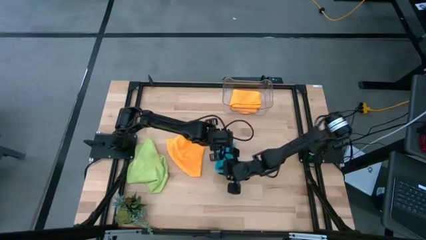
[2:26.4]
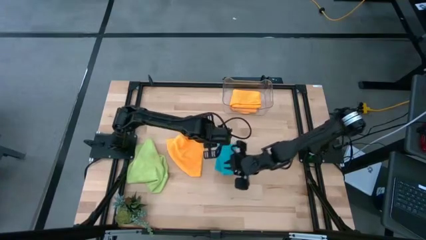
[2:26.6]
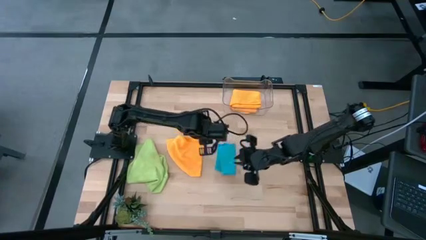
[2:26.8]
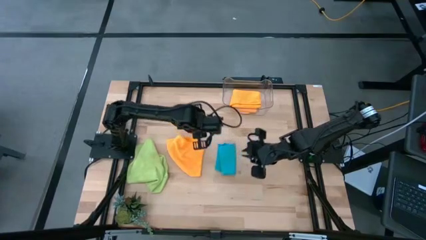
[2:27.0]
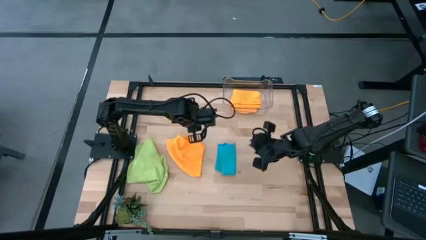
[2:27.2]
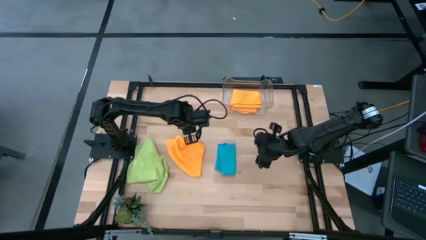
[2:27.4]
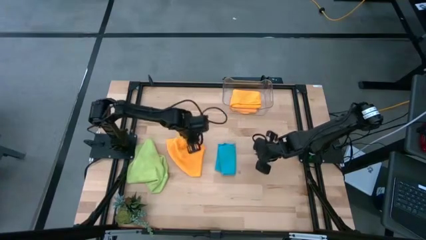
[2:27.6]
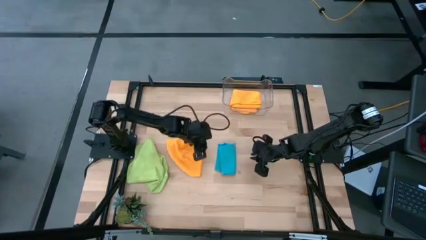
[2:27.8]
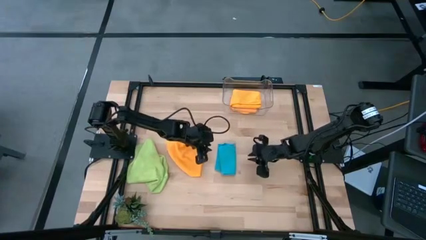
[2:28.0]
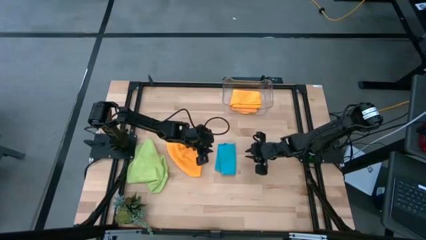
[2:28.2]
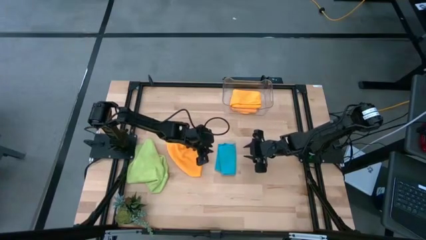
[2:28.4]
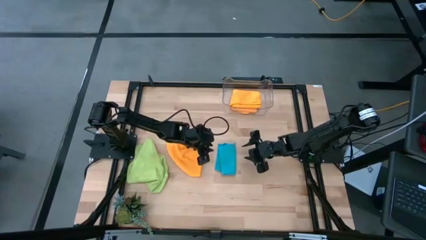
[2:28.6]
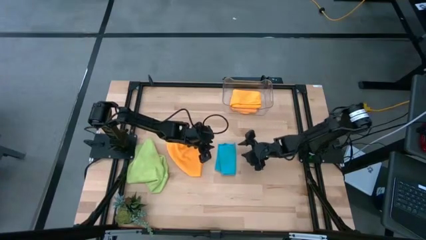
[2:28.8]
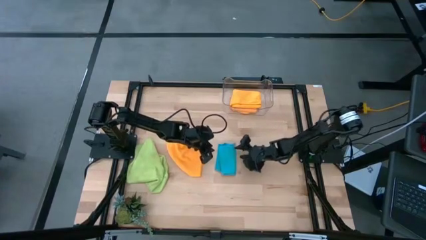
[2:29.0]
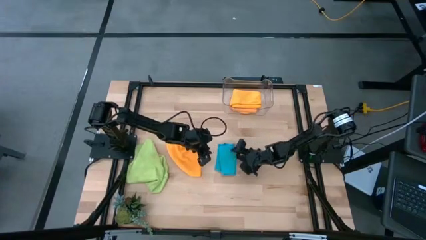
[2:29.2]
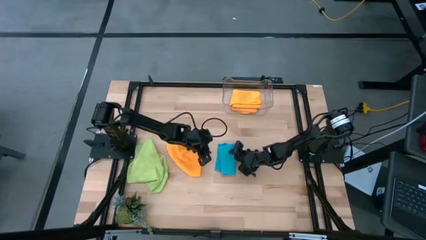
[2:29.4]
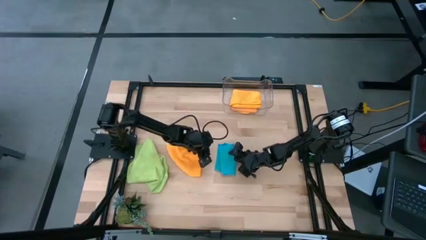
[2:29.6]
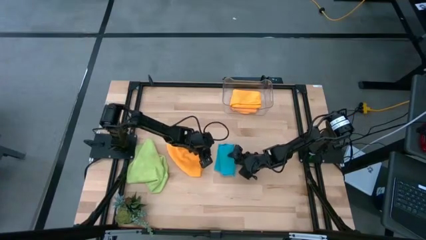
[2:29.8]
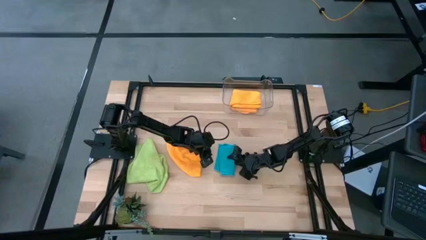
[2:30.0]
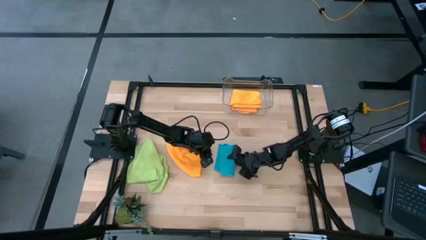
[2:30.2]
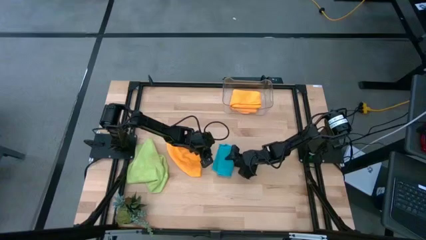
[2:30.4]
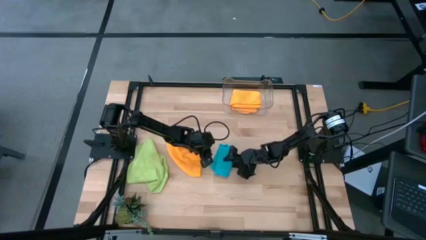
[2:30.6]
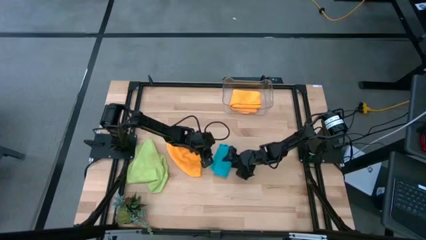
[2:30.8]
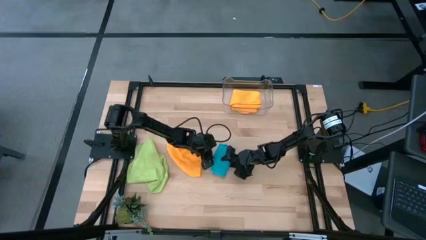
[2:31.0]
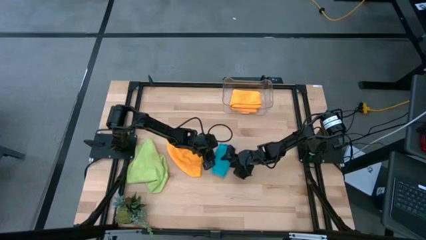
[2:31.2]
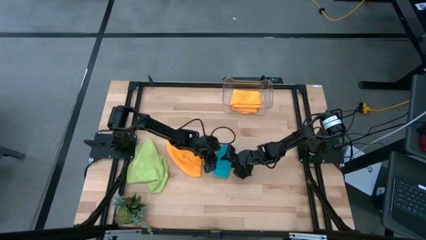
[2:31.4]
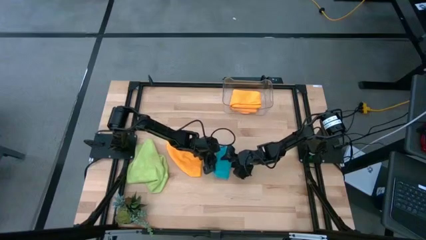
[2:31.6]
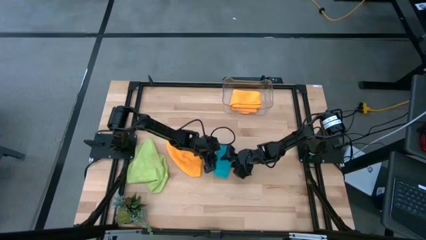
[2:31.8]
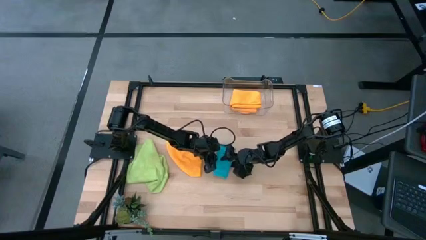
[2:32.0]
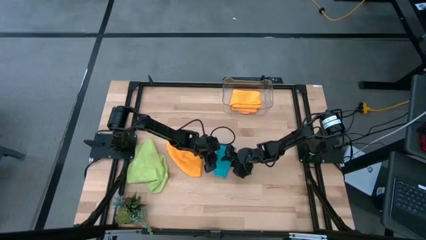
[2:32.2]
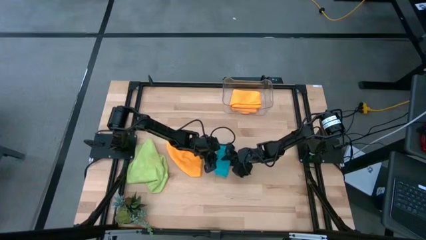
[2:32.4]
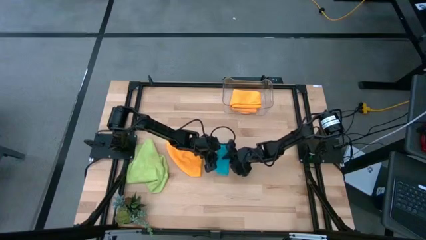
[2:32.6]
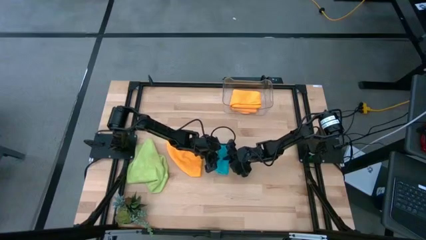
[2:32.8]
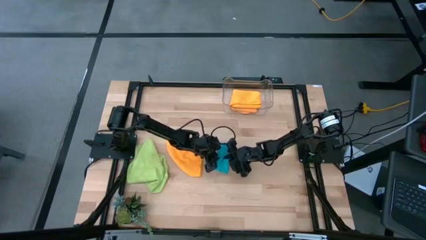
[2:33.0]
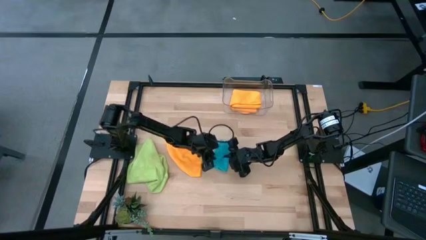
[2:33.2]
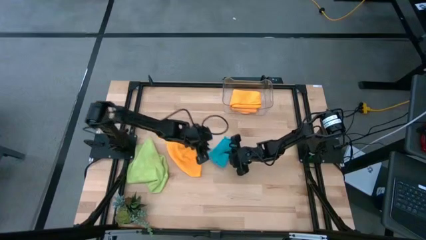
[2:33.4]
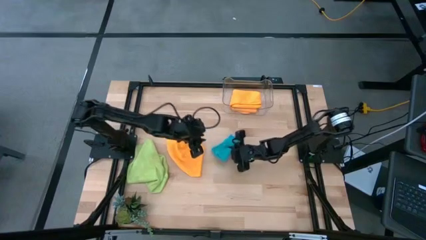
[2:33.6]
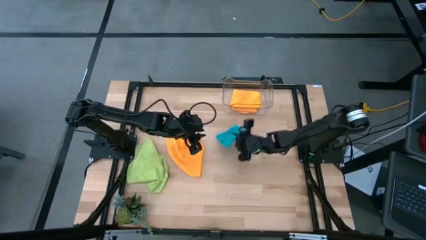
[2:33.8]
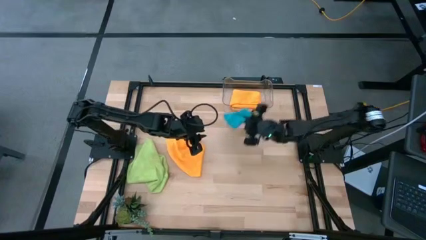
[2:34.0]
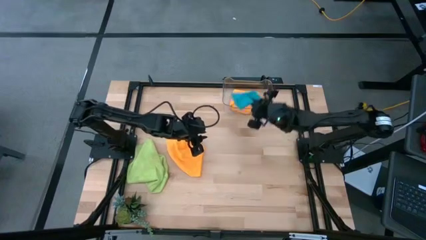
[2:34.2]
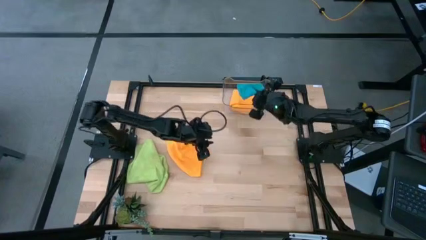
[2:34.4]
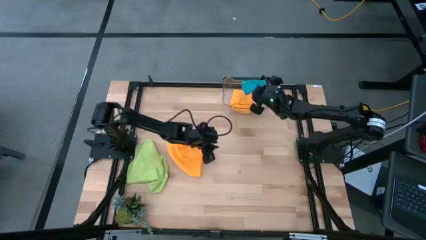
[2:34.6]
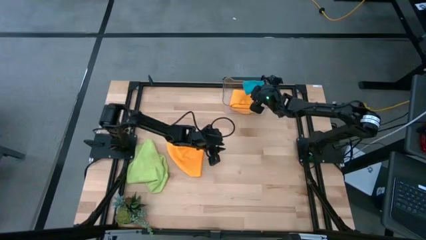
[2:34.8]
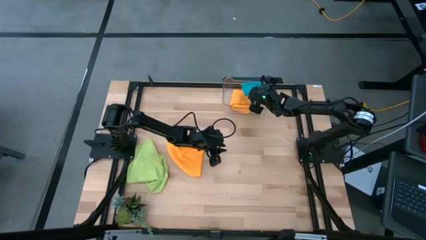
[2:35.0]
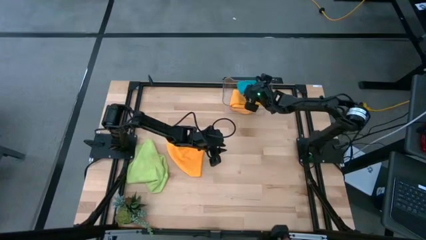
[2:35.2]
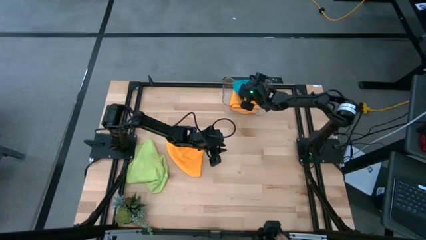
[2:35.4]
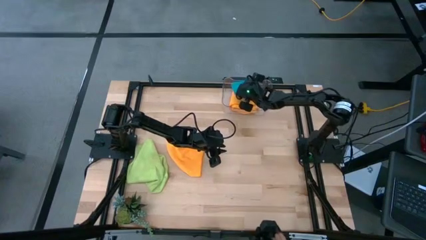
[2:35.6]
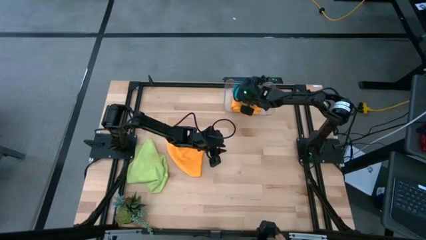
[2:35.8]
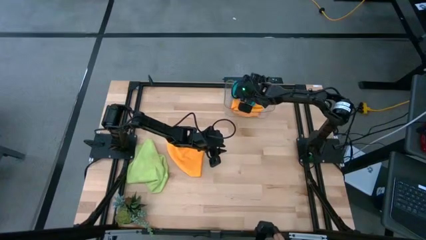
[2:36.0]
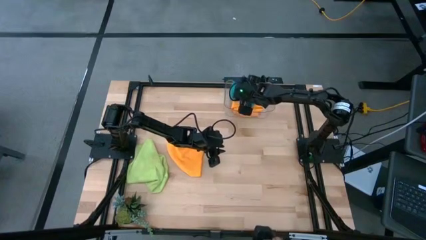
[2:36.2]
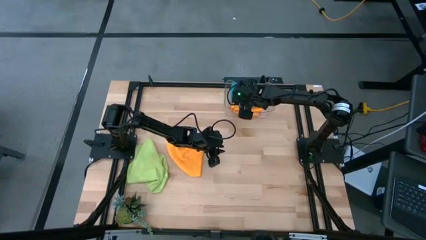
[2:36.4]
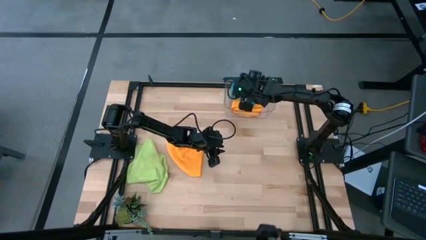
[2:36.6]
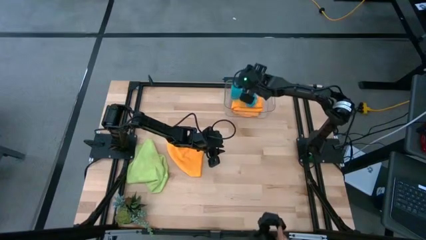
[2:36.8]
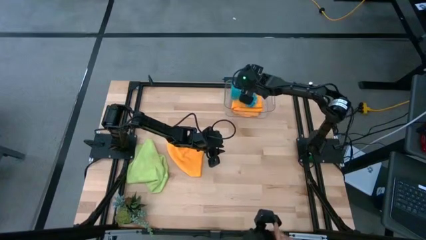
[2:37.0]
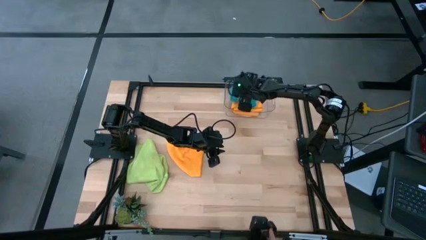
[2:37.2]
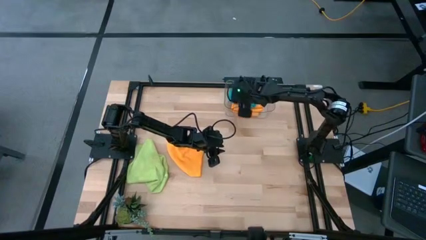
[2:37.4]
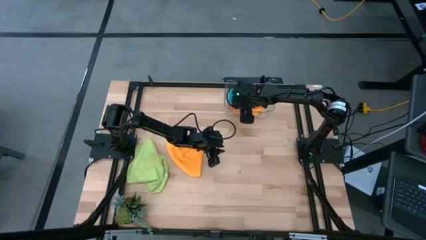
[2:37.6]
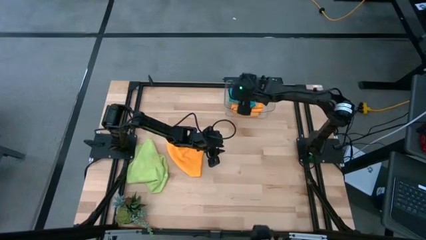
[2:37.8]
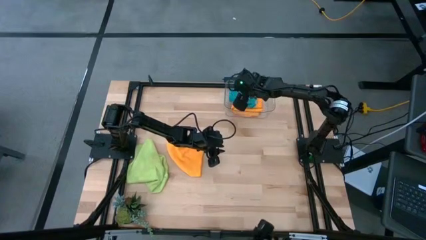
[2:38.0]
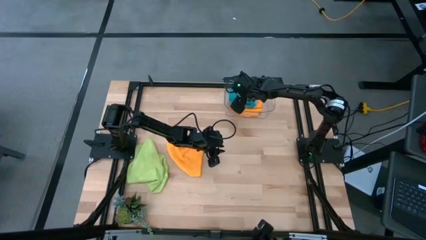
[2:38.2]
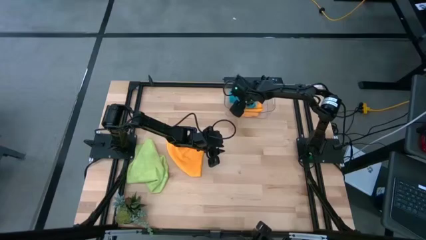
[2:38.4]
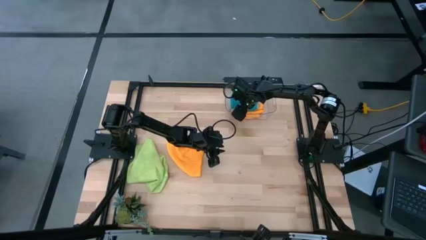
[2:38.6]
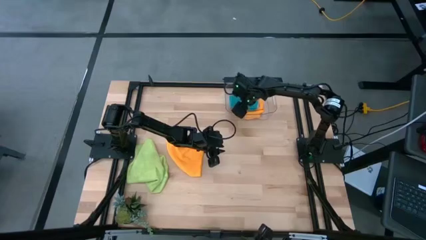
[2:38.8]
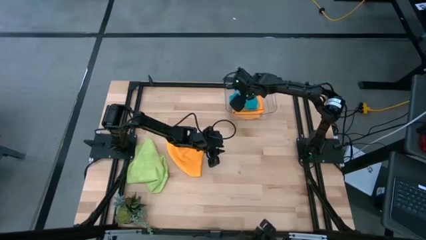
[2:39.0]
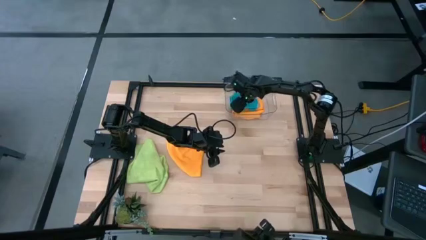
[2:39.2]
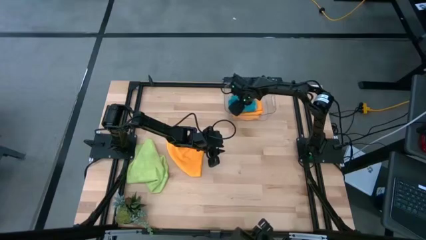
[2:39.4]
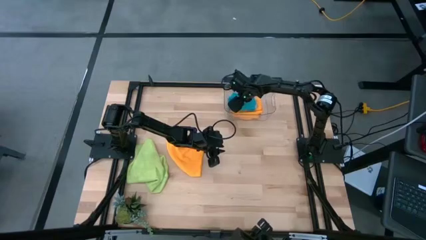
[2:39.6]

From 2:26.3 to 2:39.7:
Task: Fold microfiber towels
Stack the folded blue microfiber towel on top of the orange microfiber towel in the transparent bin

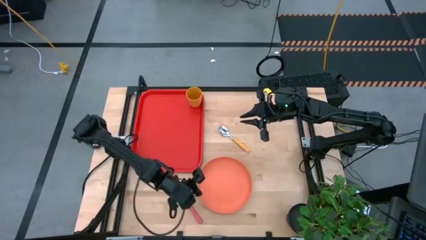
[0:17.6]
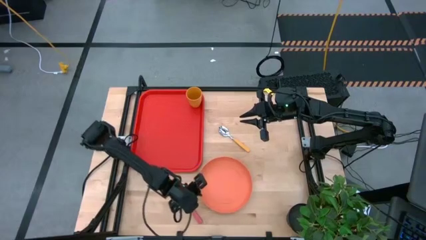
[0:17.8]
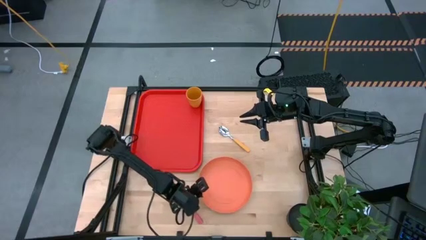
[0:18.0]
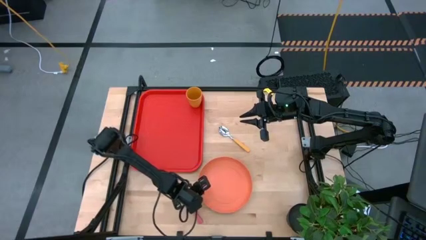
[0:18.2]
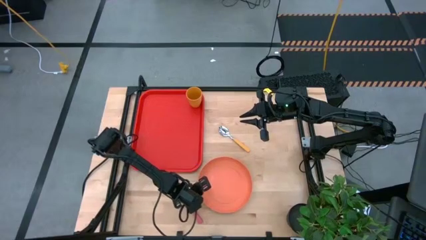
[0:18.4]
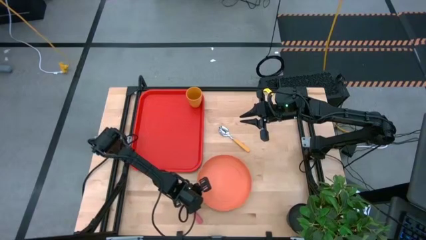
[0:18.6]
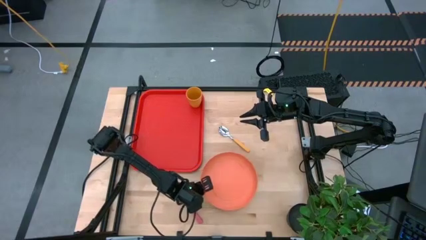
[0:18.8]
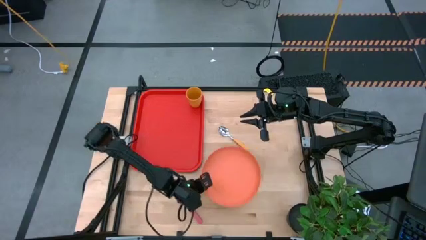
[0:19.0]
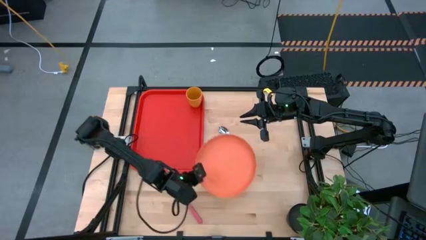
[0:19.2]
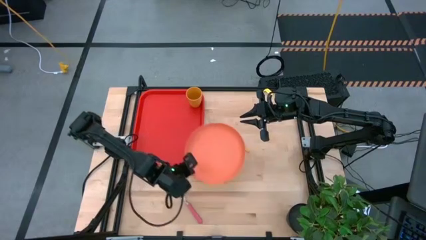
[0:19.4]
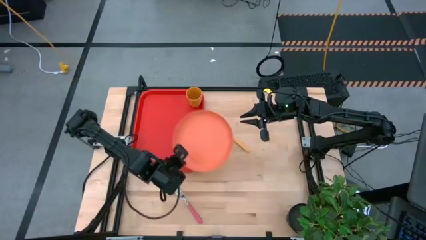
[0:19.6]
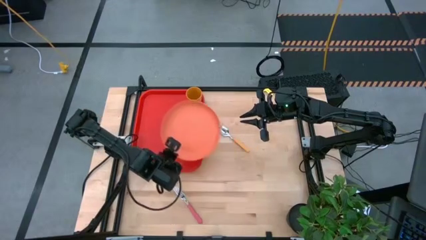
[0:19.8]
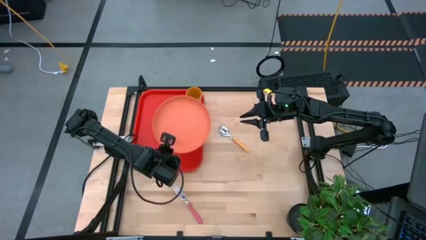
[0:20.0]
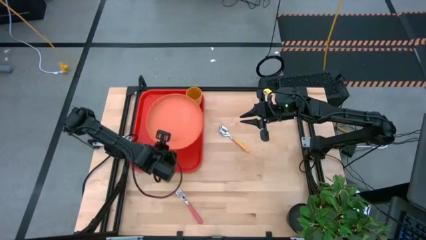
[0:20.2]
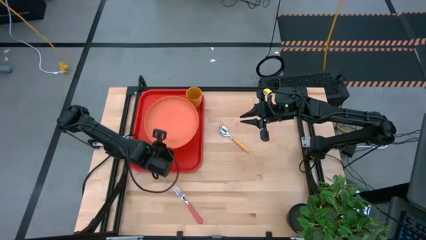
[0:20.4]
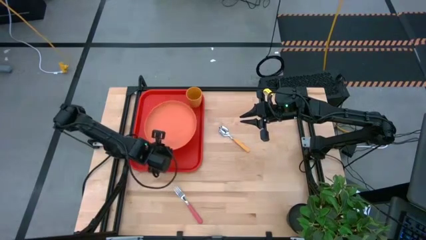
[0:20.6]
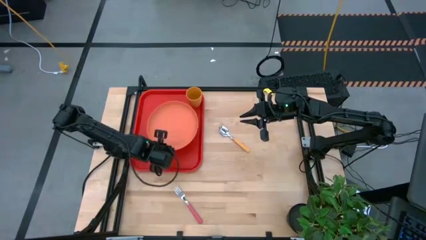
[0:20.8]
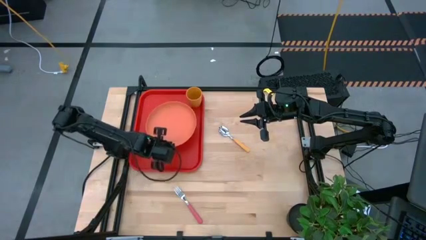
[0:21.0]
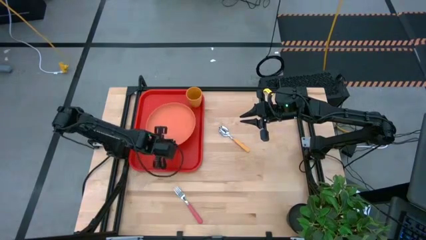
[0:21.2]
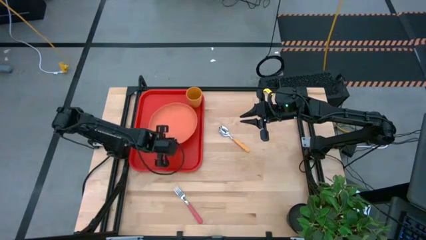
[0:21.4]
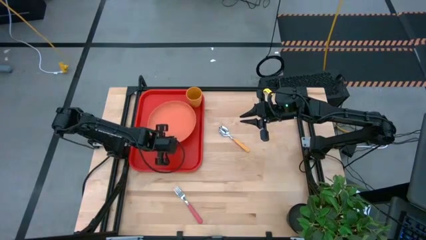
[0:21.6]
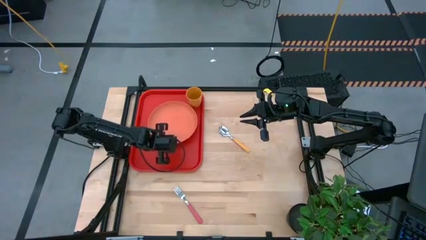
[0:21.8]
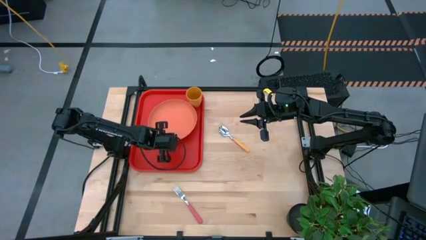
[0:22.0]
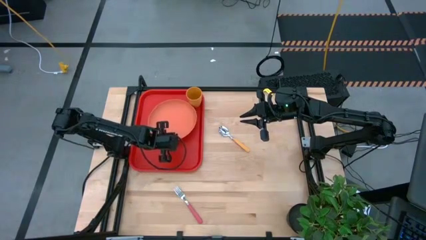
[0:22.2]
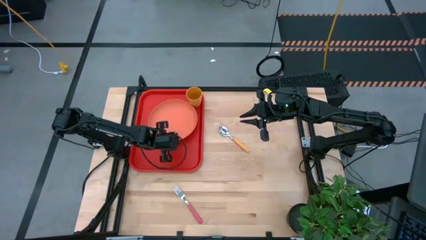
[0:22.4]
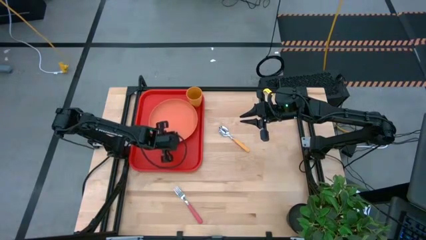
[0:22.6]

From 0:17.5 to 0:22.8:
Task: Pick and place plate/cup/fork/spoon on tray
Put the orange plate on the red serving tray at the bottom left of the yellow cup
